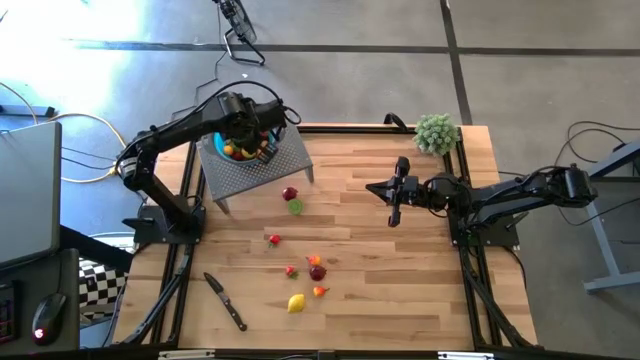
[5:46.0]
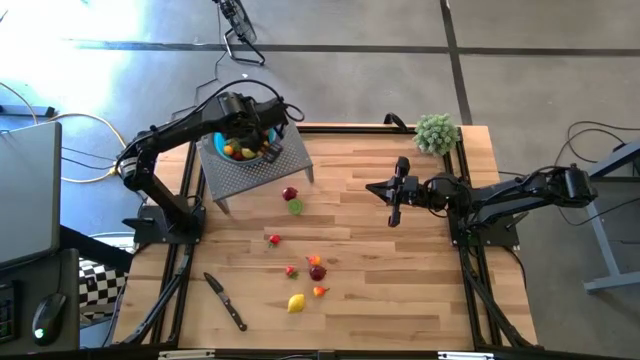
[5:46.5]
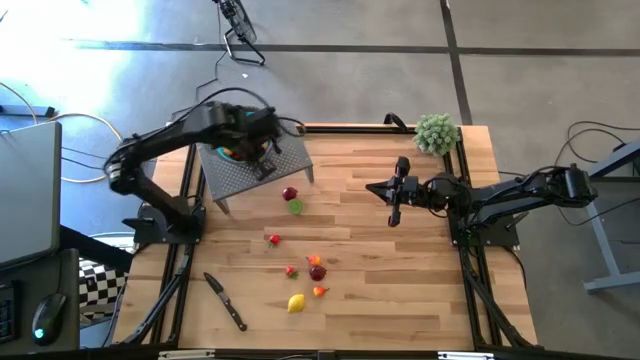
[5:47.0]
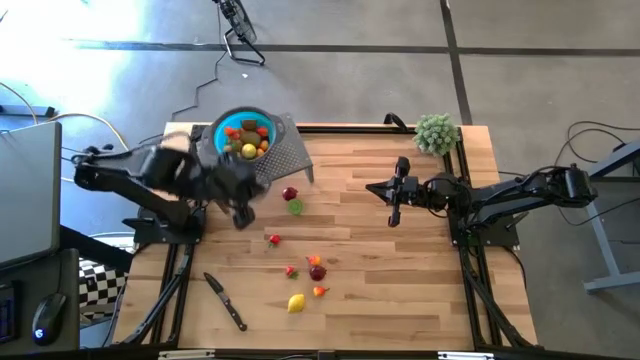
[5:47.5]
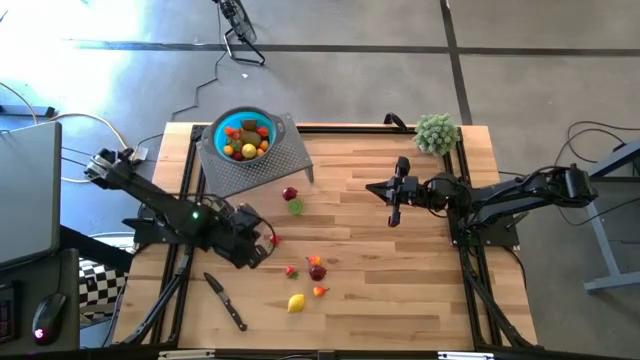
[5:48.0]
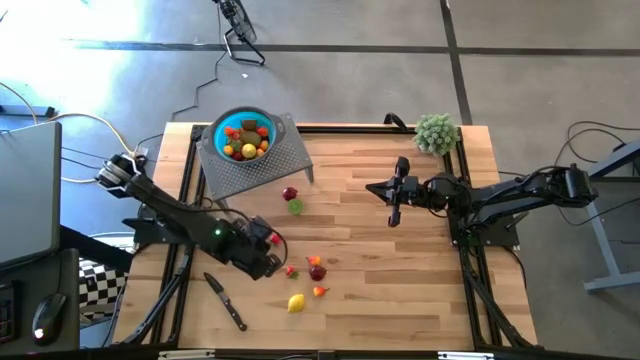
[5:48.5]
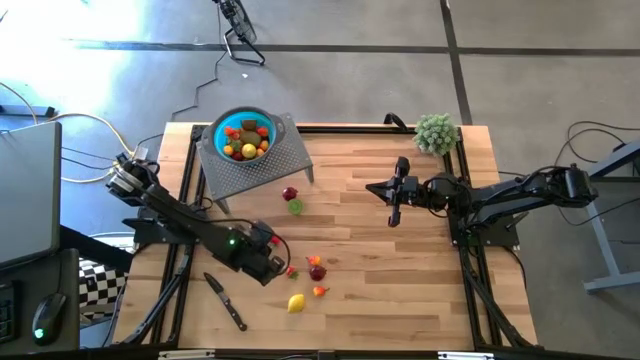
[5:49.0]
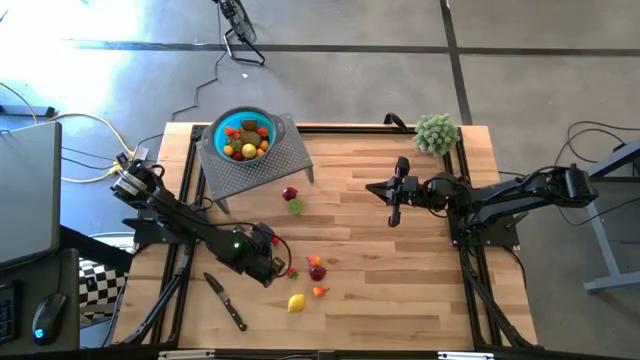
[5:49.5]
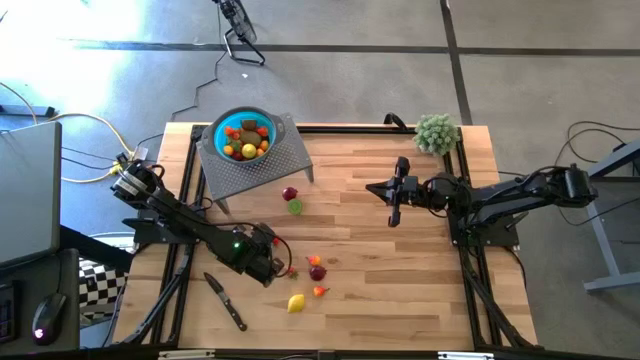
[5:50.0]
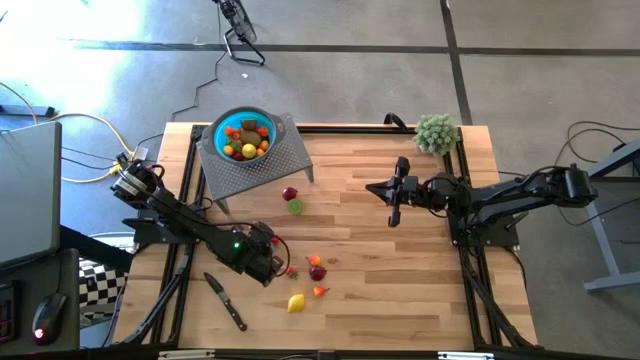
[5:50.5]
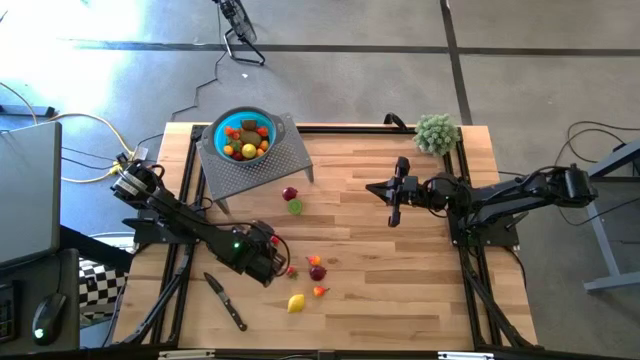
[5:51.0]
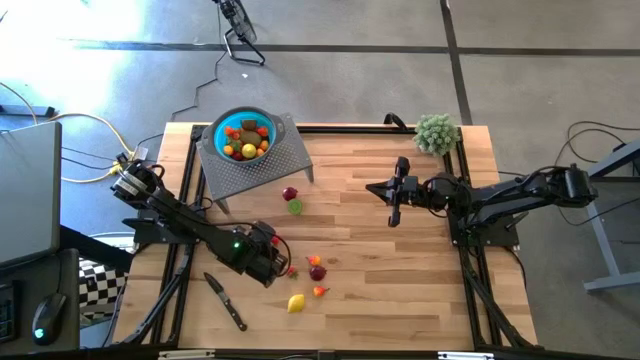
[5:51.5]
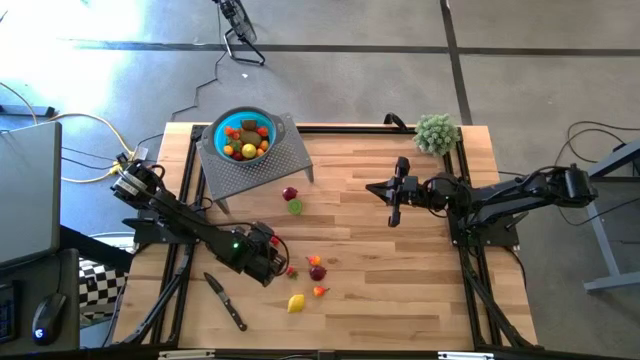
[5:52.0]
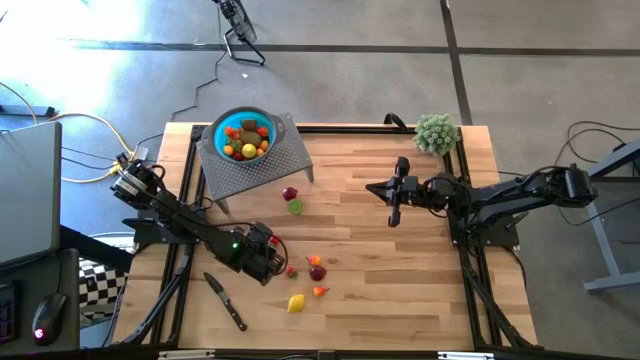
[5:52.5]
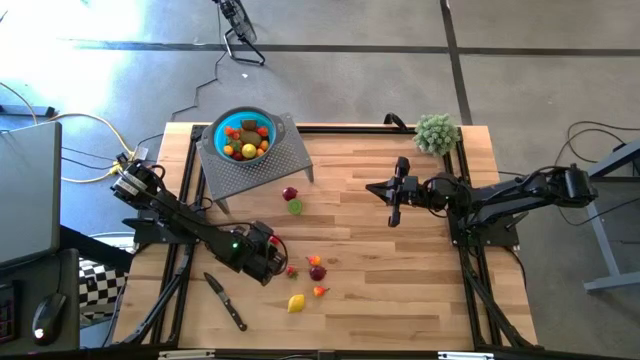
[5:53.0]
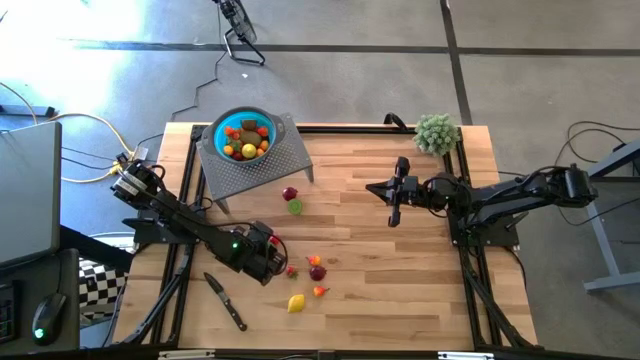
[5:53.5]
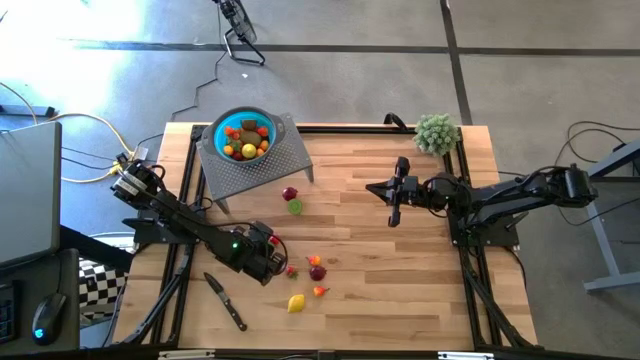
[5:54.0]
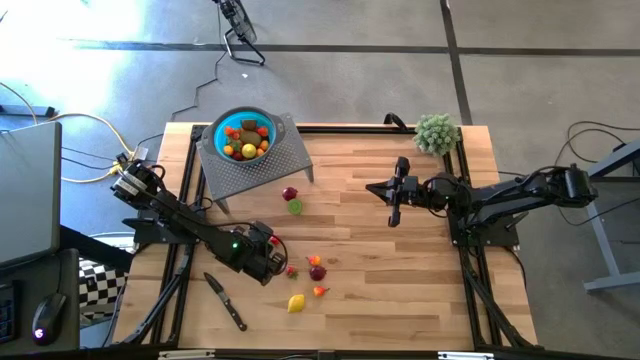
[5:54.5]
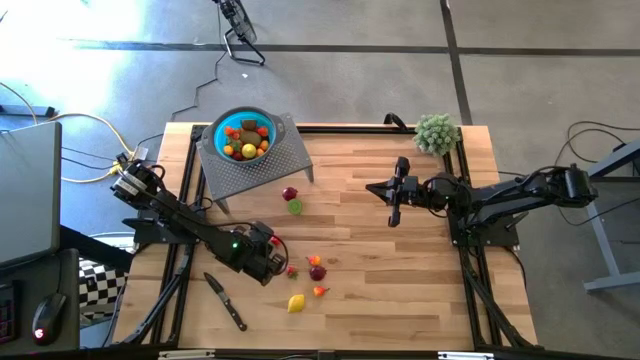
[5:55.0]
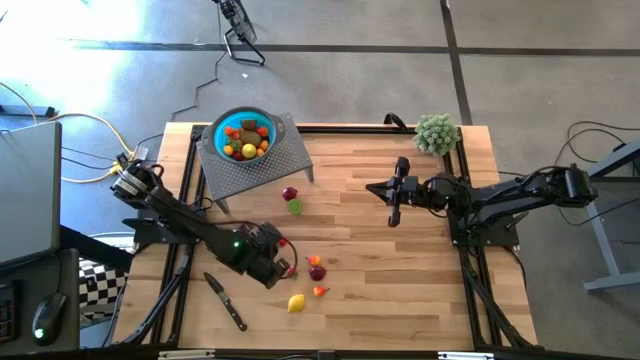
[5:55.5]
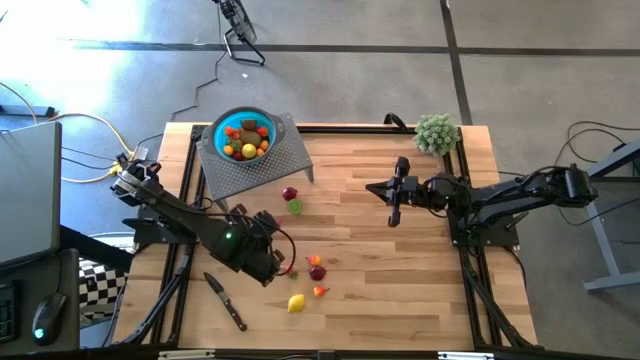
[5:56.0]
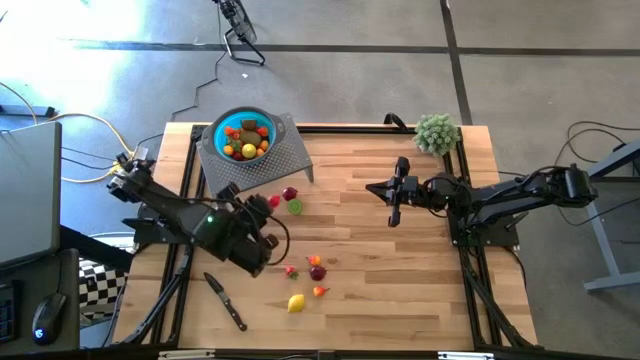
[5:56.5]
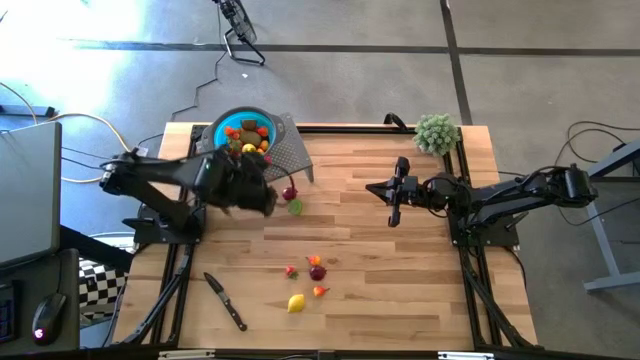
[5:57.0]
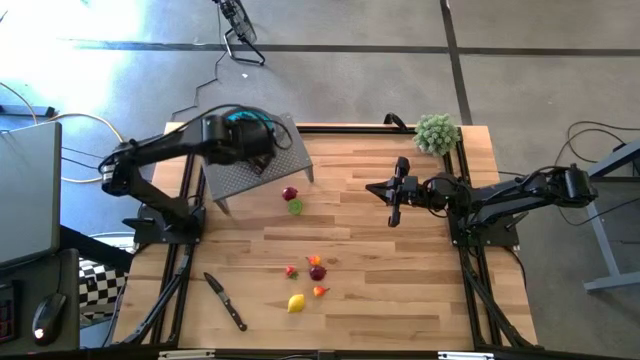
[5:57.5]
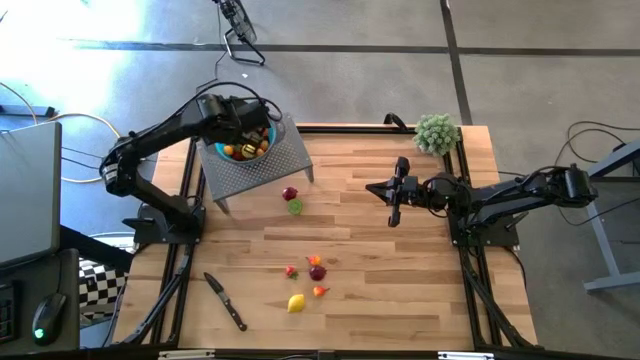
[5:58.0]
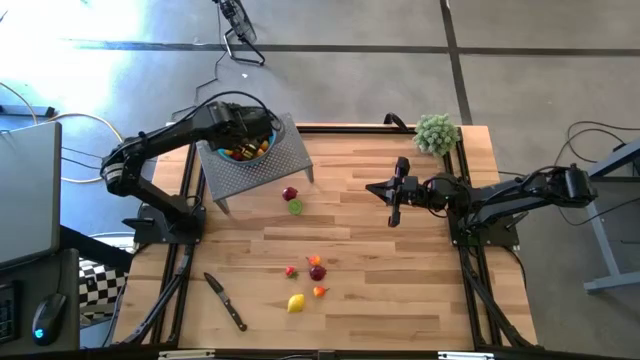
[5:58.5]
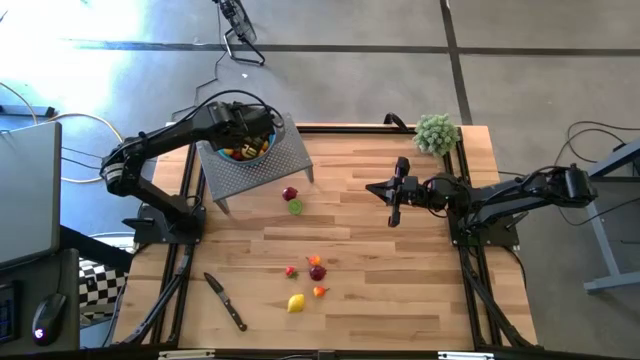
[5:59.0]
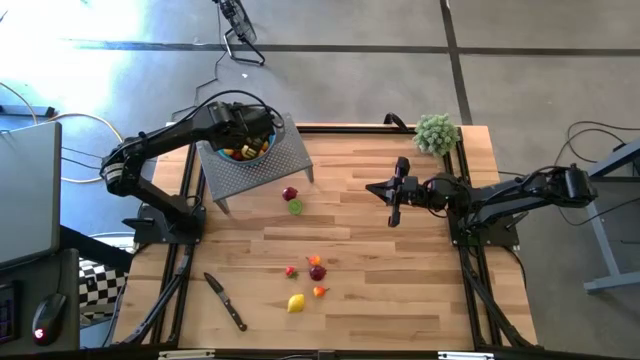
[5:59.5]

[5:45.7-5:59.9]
Task: Pick & Place Fruit
Put the red strawberry into the blue strainer bowl on the shelf

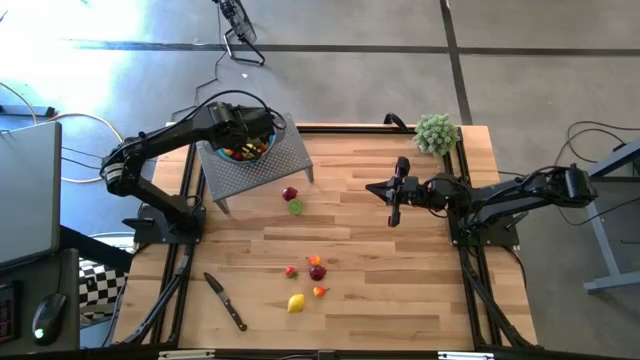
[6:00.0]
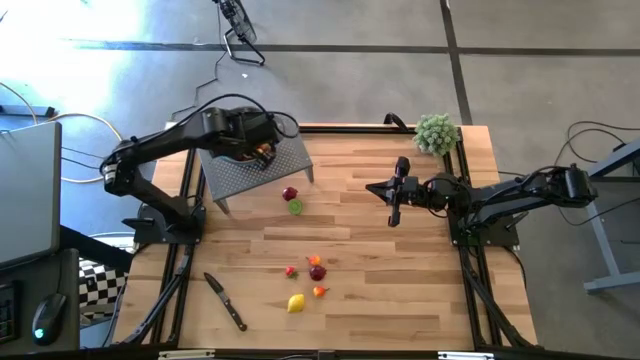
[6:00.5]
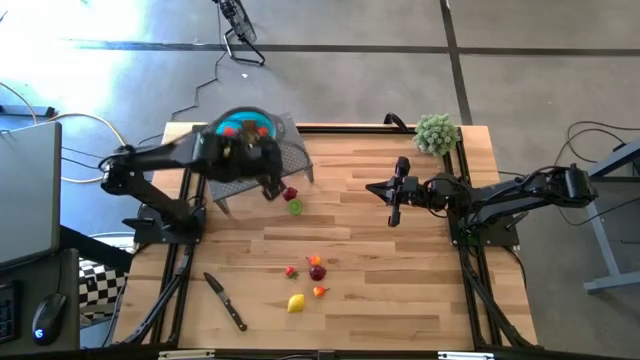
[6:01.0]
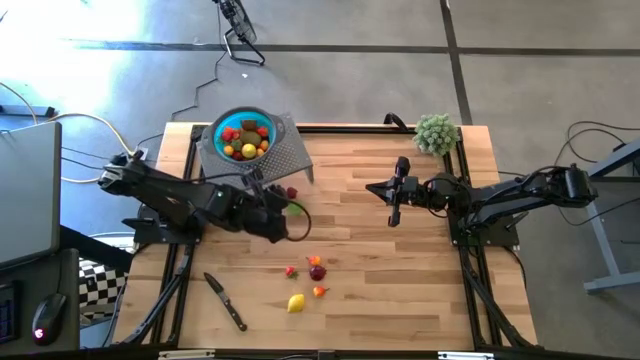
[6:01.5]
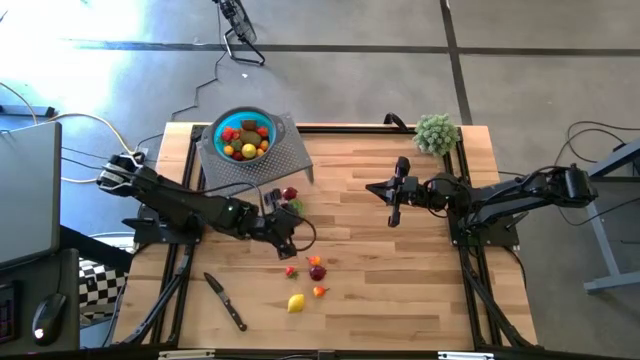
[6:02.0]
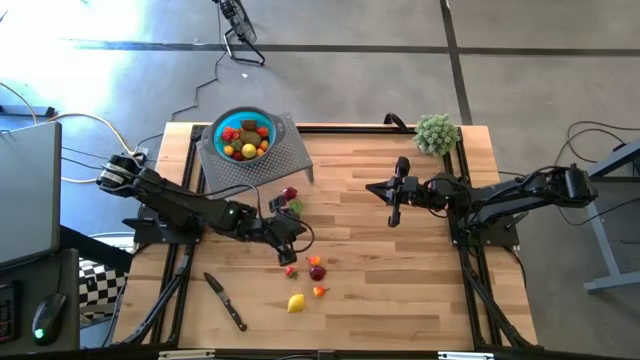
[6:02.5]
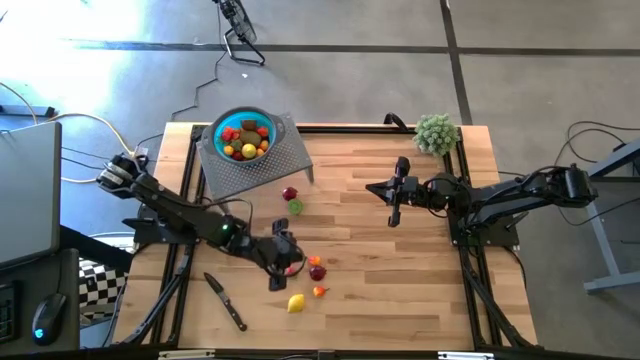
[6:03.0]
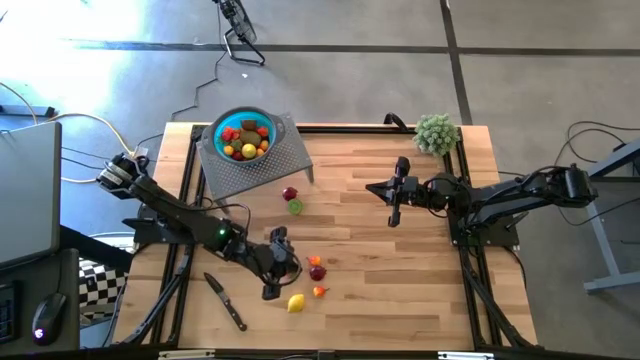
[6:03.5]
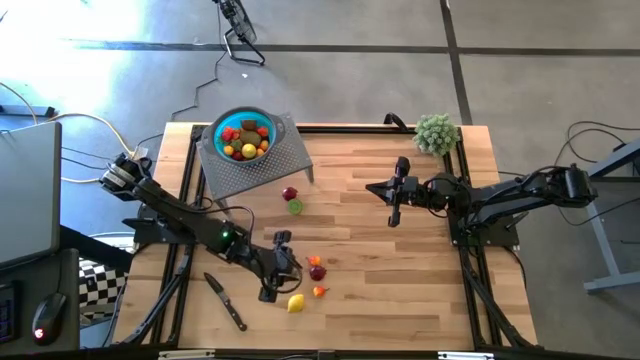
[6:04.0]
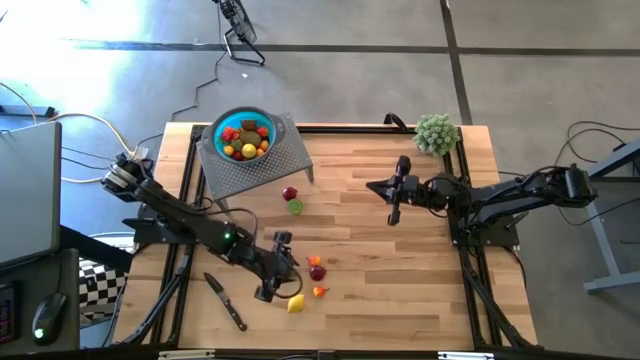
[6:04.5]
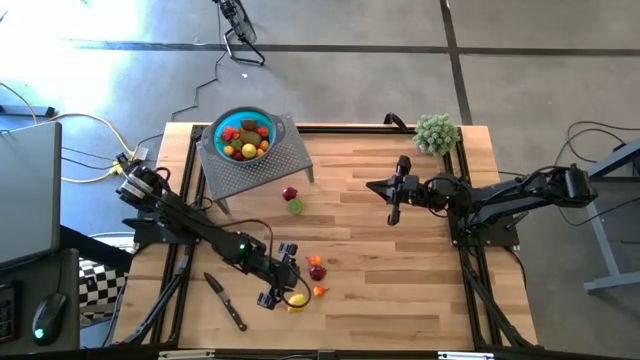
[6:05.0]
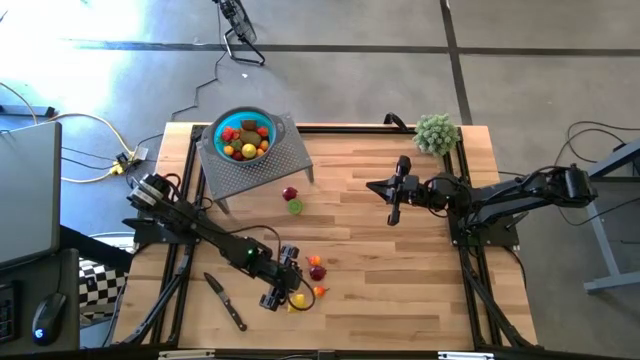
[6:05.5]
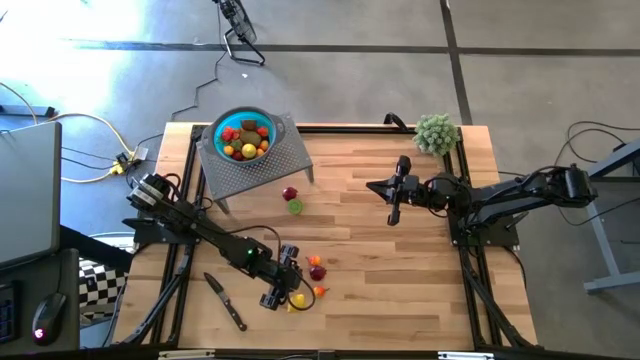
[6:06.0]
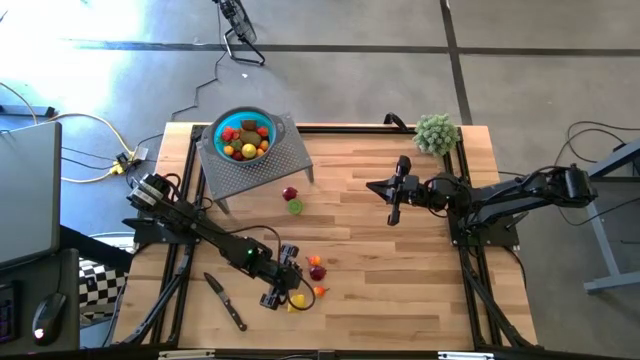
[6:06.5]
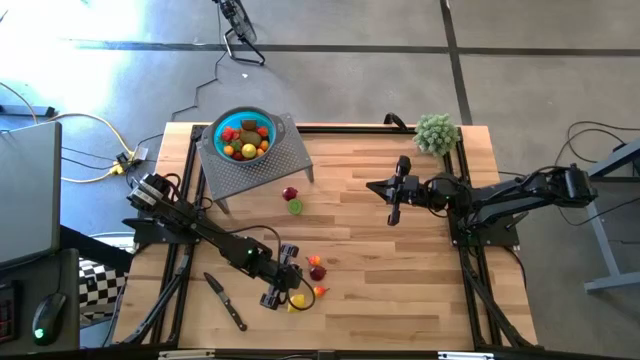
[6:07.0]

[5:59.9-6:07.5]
Put the red strawberry into the blue strainer bowl on the shelf
